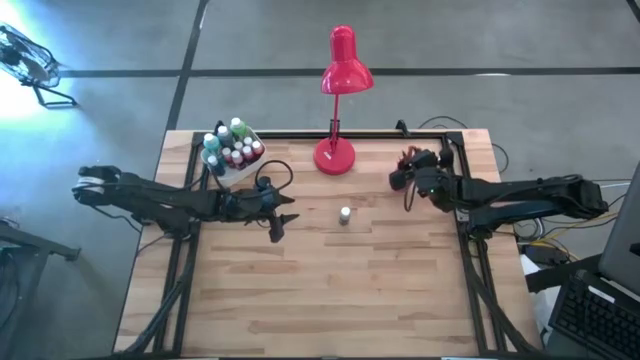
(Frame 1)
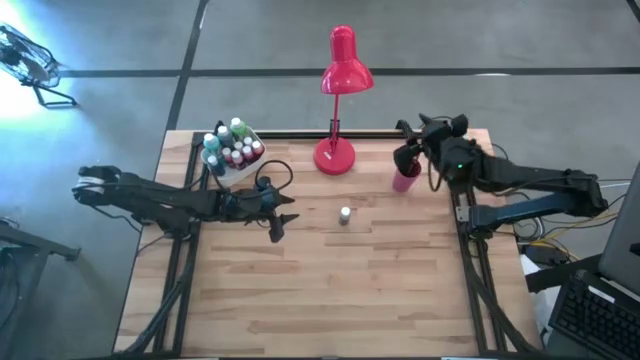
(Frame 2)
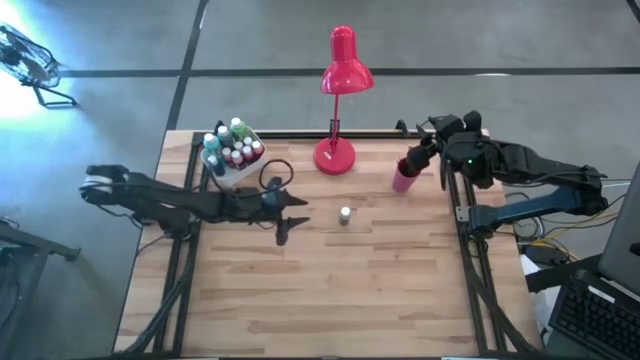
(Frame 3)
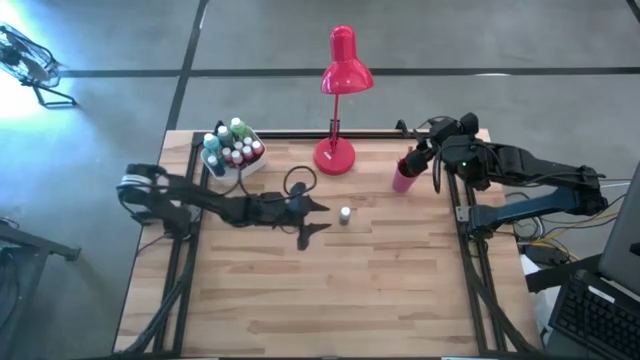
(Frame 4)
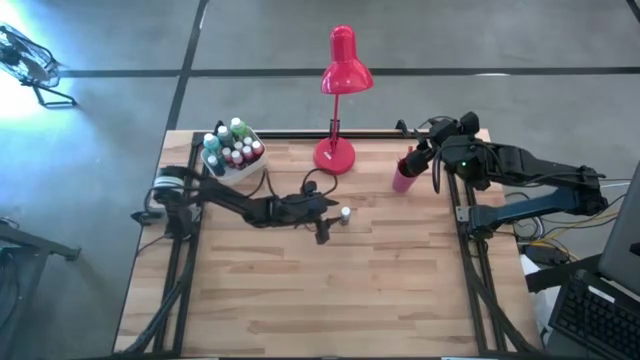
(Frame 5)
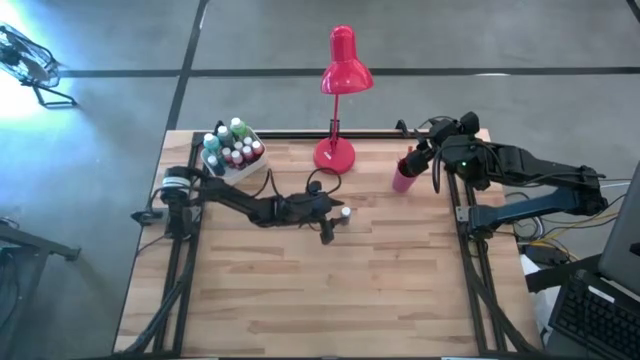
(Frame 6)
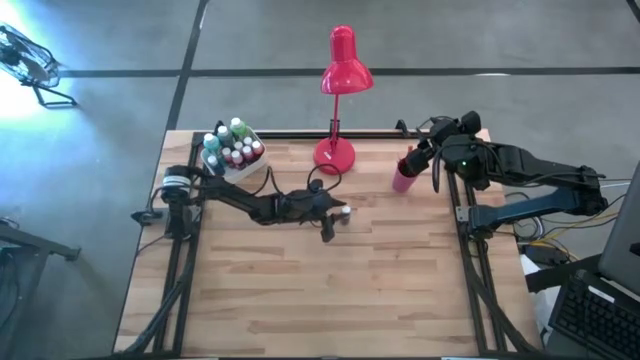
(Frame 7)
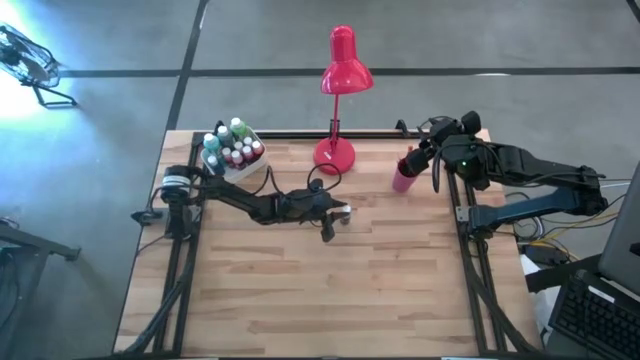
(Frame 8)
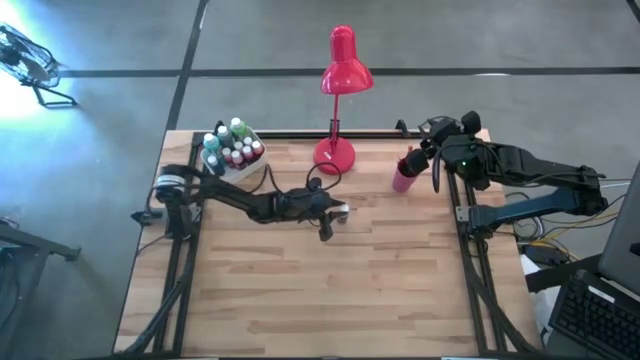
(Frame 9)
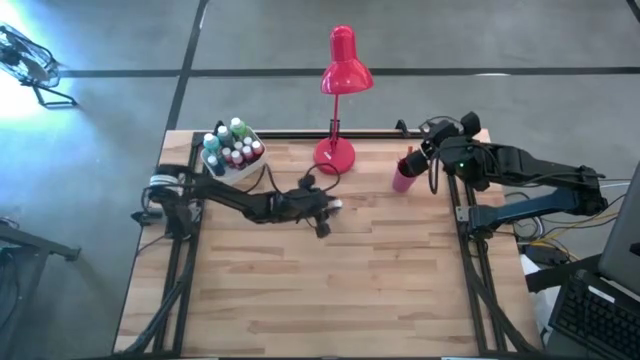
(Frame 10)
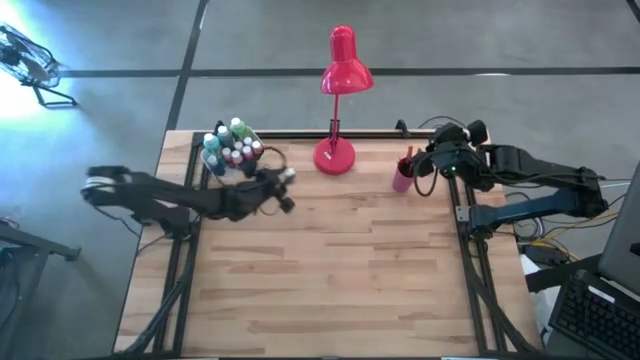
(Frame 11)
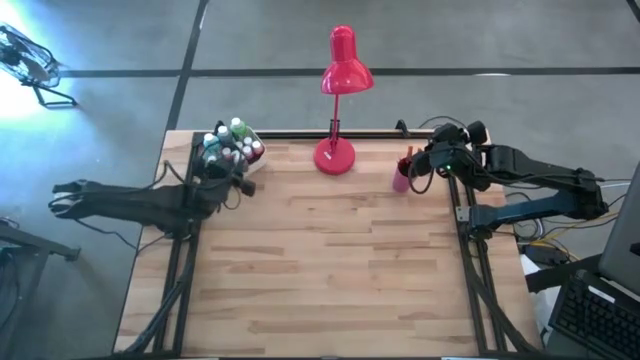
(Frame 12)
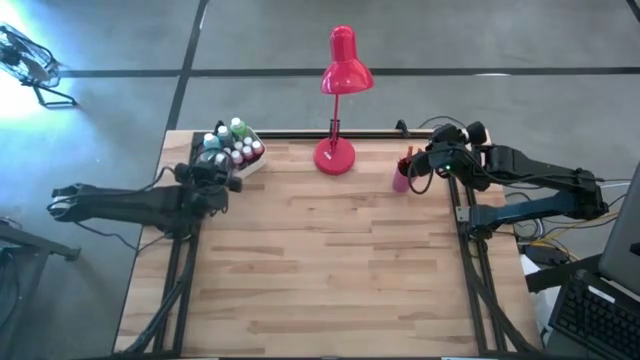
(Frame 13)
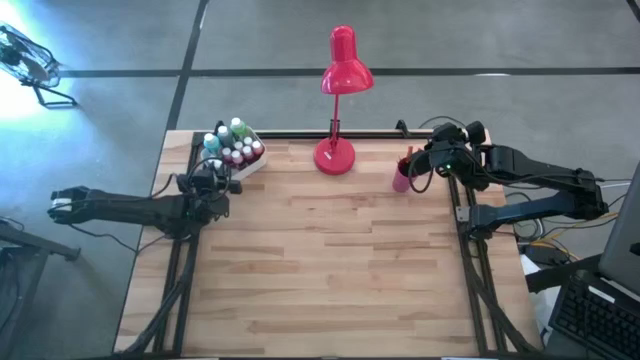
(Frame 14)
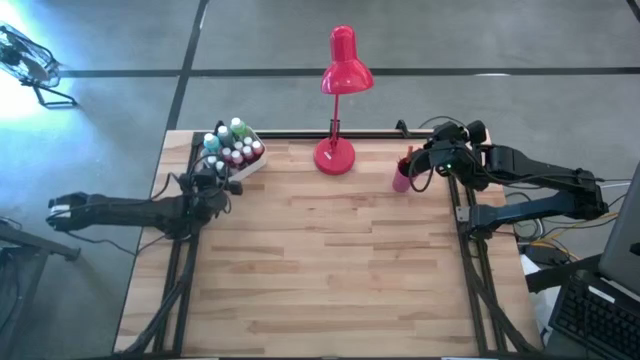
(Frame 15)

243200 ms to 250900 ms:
Task: Pick & Place Paint Supplies
Put the gray paint bottle into the white bin

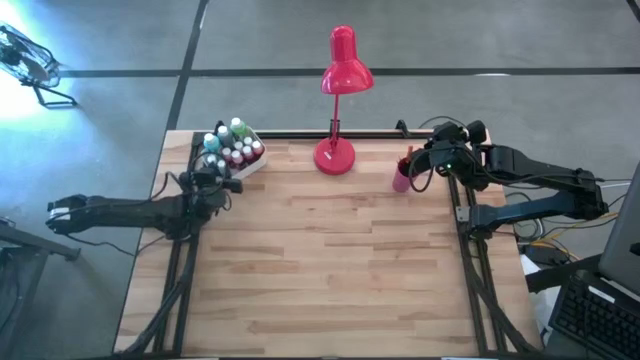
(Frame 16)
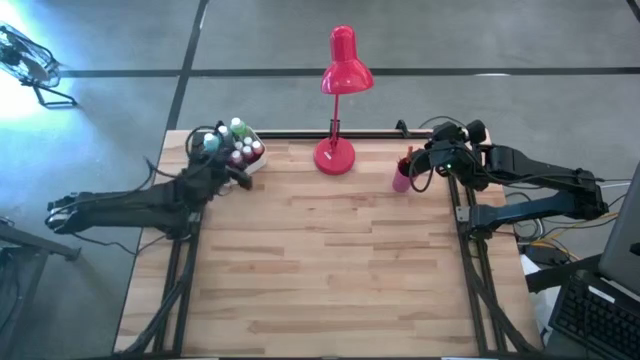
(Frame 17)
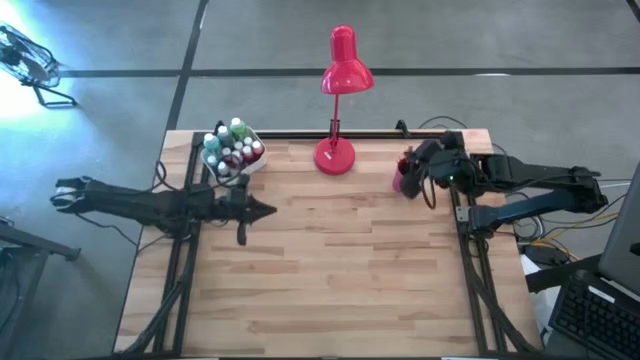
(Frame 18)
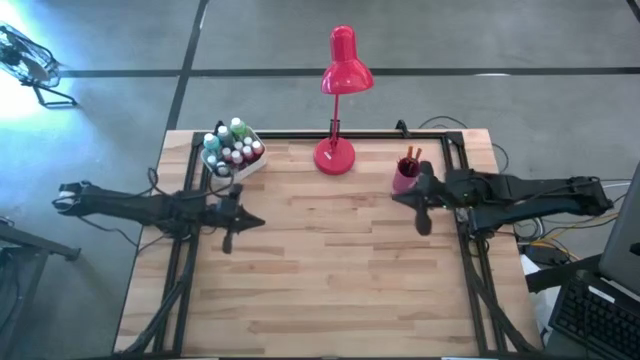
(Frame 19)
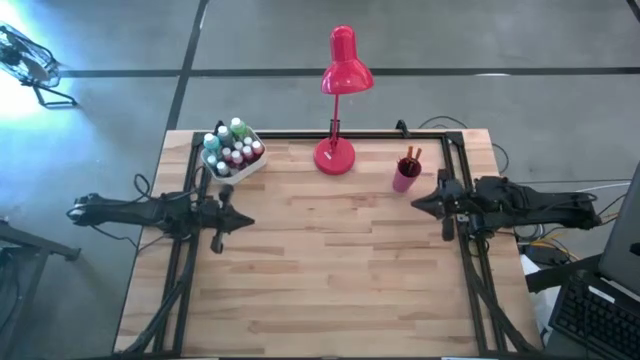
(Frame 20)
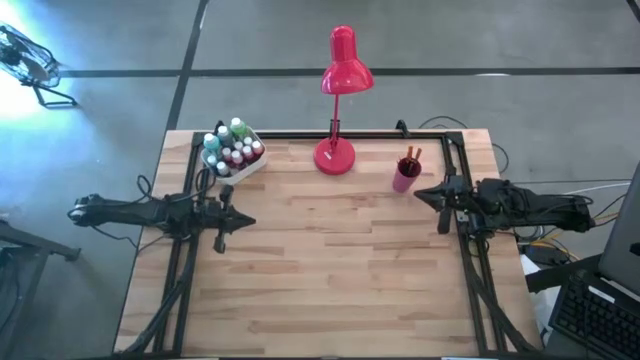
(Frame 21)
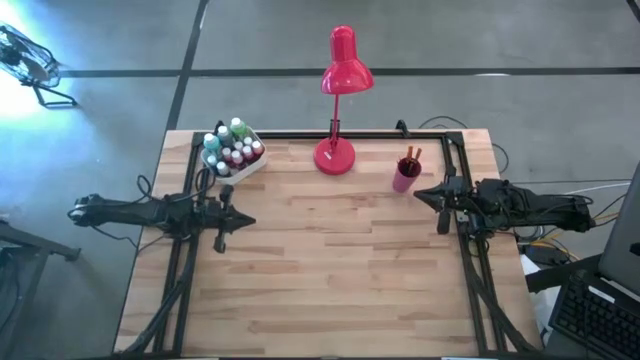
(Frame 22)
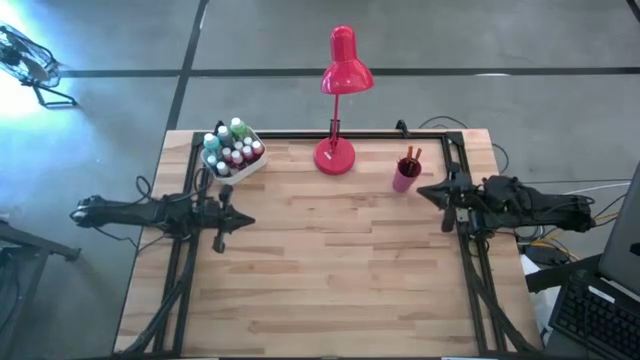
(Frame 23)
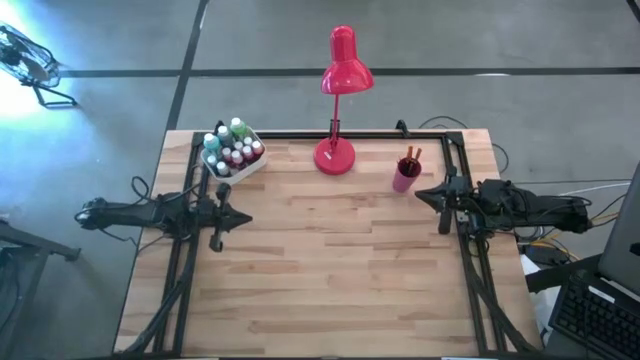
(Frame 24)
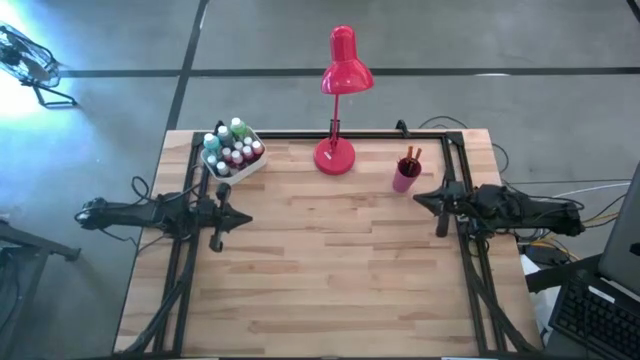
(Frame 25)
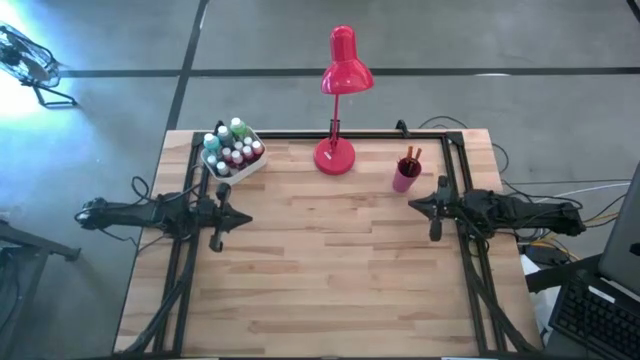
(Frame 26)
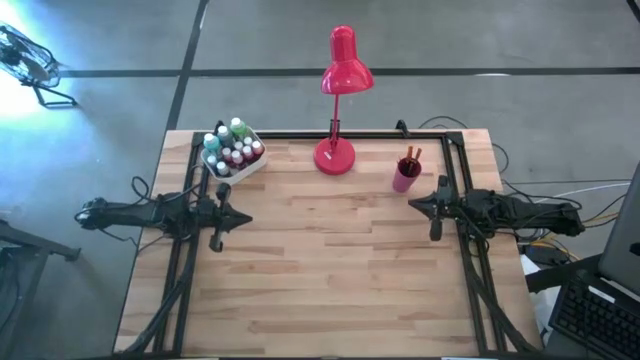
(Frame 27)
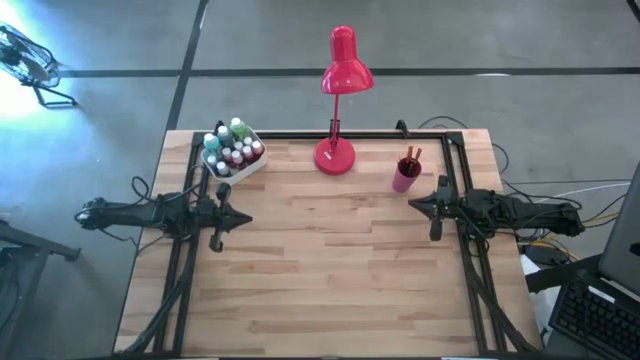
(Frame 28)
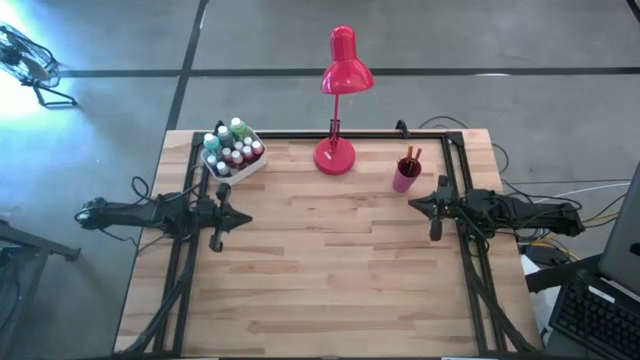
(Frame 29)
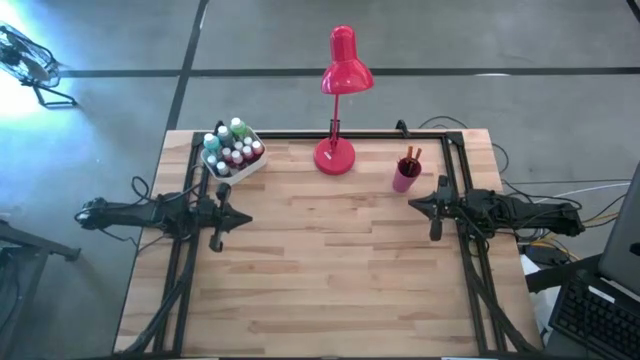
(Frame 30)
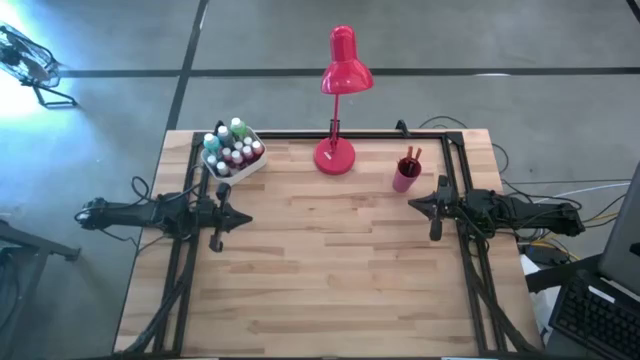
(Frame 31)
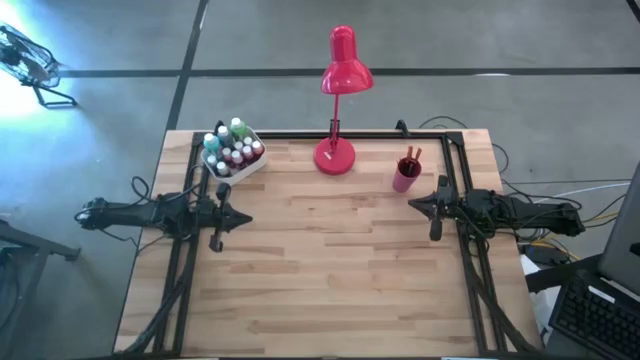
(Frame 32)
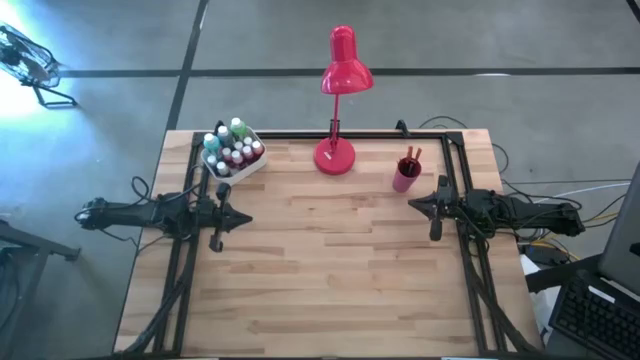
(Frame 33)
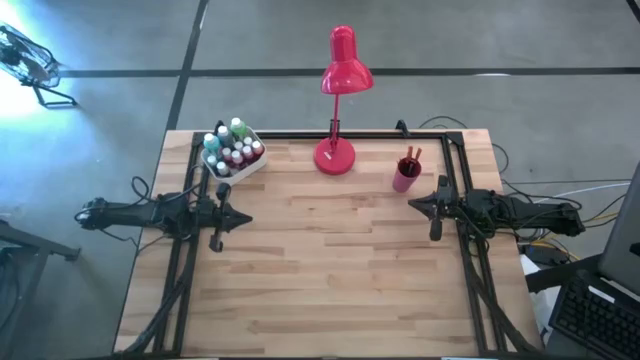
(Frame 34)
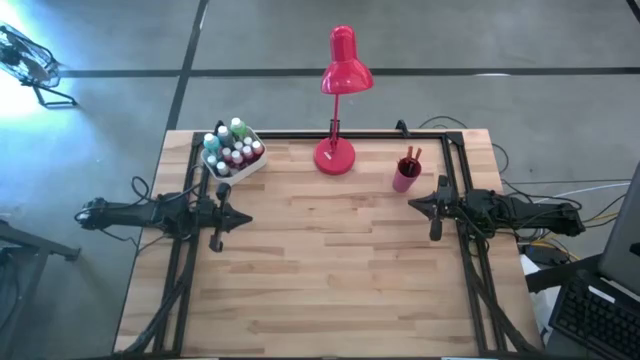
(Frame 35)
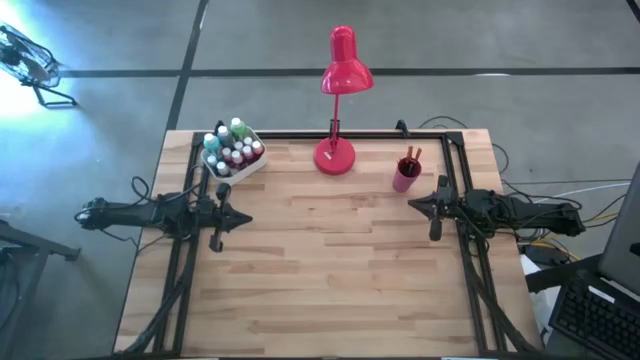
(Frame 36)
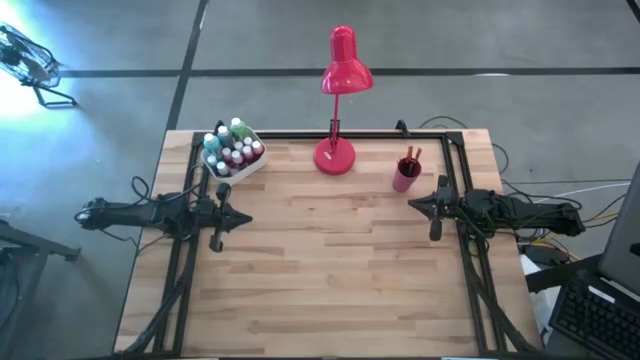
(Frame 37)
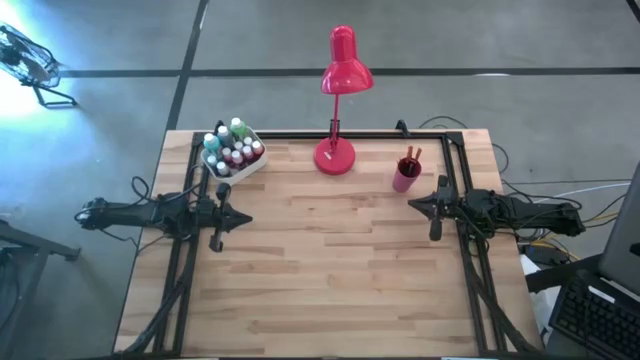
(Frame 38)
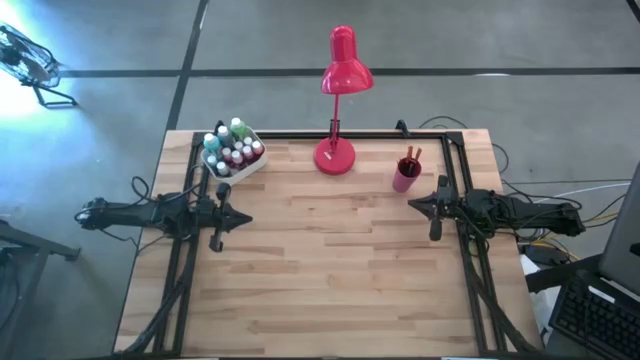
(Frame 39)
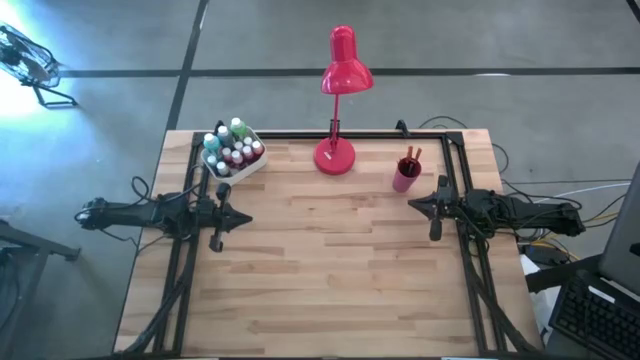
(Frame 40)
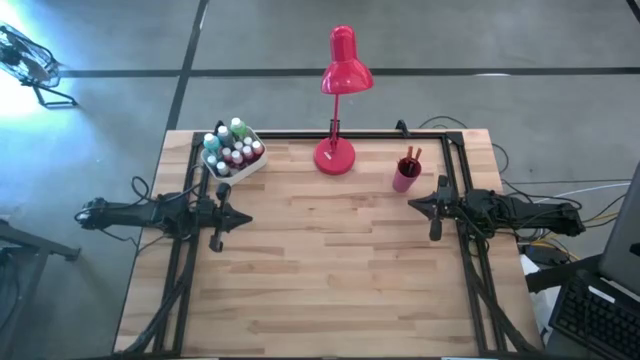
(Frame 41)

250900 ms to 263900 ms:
Return to Home Position
